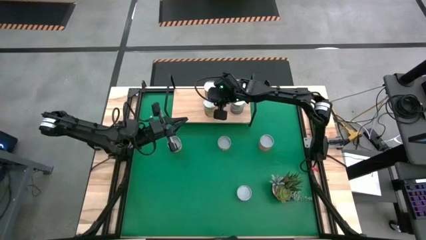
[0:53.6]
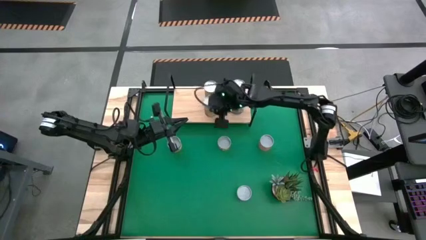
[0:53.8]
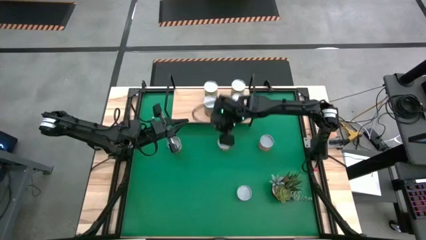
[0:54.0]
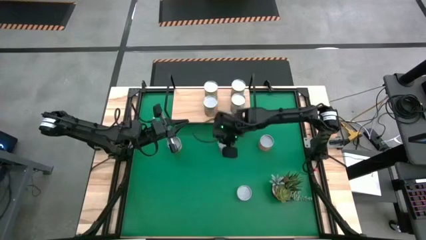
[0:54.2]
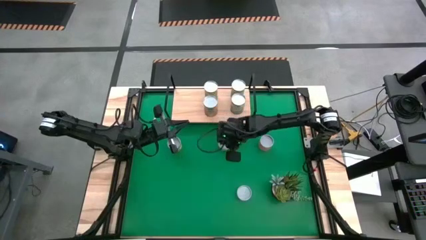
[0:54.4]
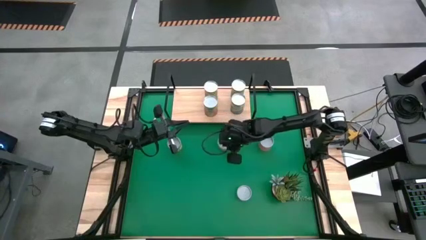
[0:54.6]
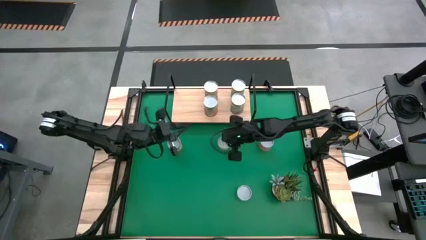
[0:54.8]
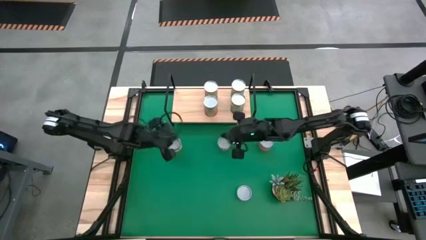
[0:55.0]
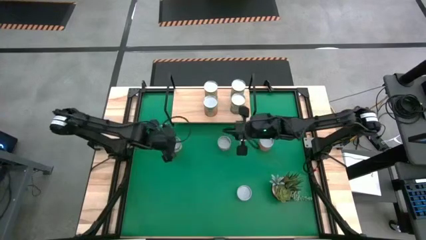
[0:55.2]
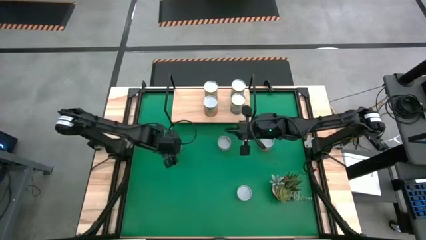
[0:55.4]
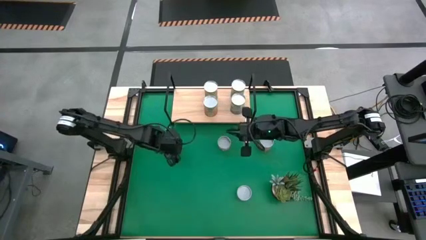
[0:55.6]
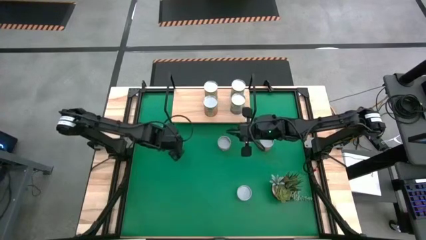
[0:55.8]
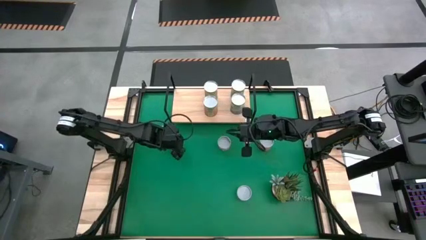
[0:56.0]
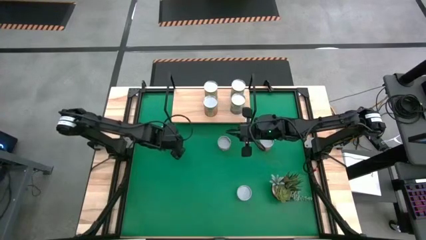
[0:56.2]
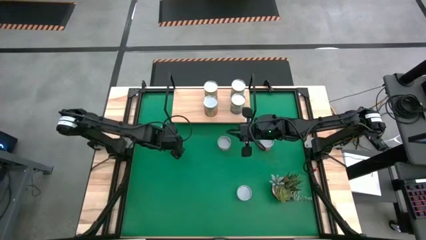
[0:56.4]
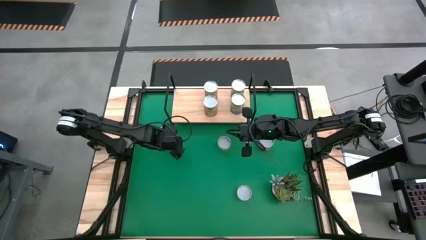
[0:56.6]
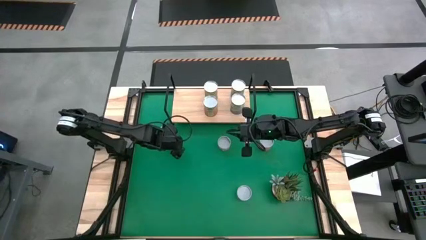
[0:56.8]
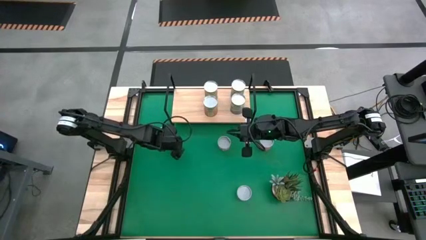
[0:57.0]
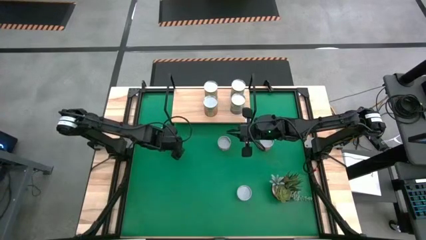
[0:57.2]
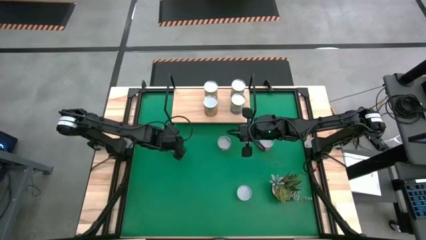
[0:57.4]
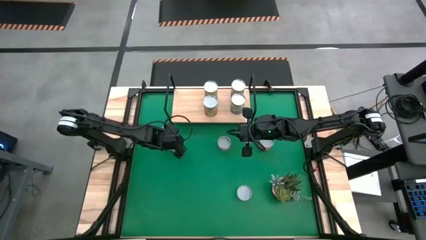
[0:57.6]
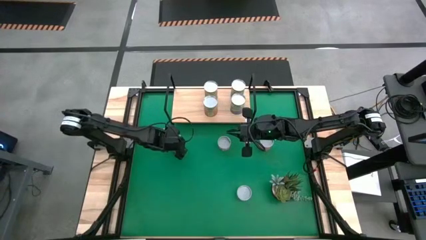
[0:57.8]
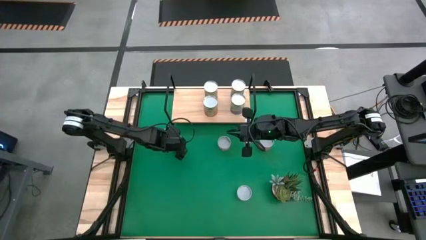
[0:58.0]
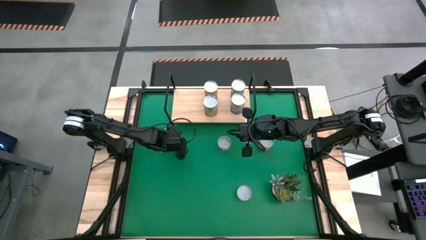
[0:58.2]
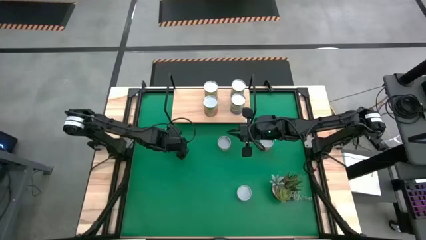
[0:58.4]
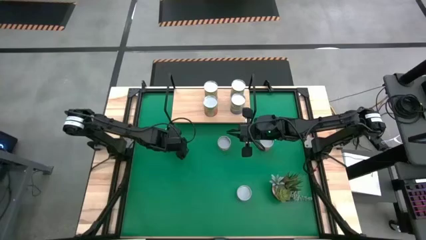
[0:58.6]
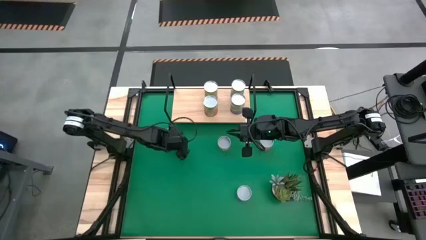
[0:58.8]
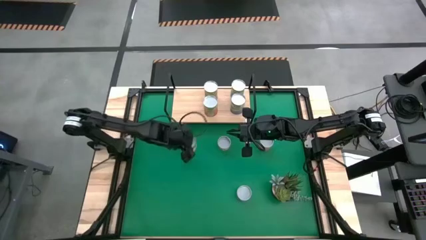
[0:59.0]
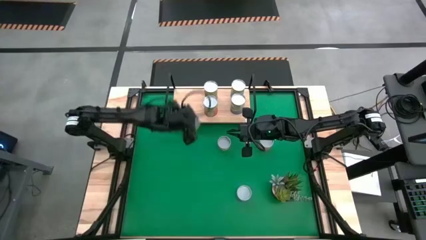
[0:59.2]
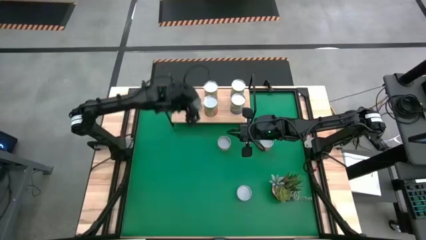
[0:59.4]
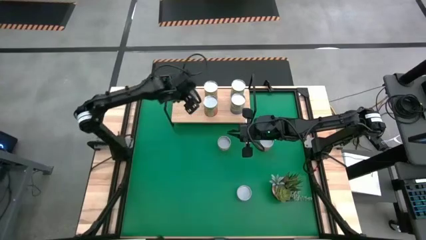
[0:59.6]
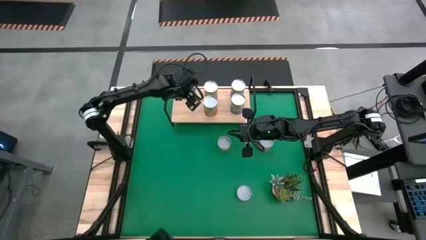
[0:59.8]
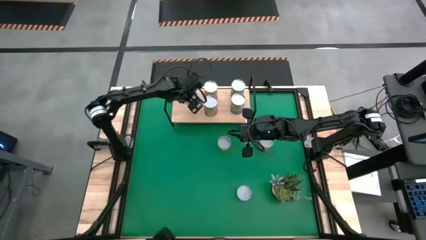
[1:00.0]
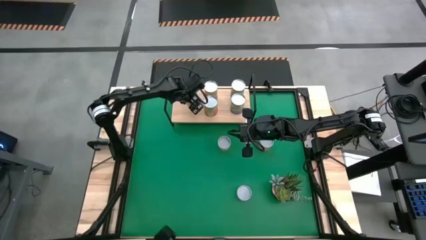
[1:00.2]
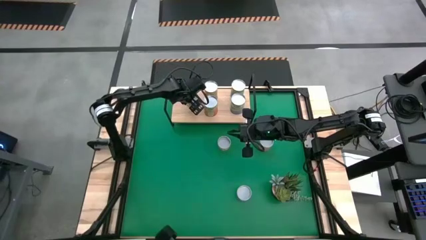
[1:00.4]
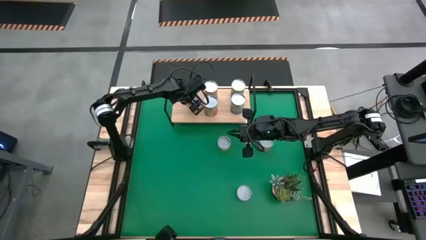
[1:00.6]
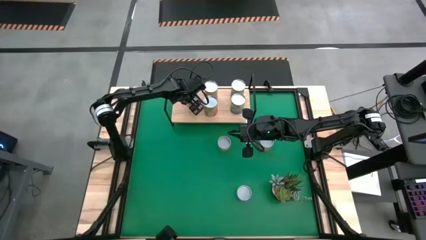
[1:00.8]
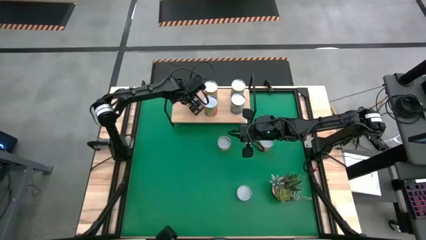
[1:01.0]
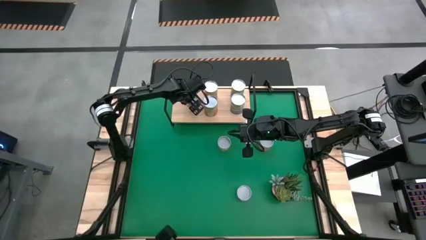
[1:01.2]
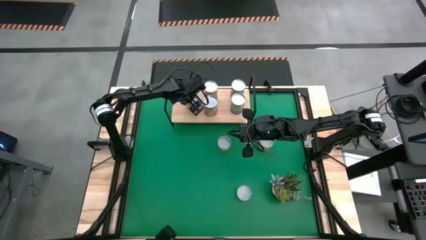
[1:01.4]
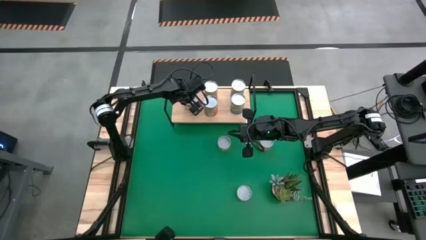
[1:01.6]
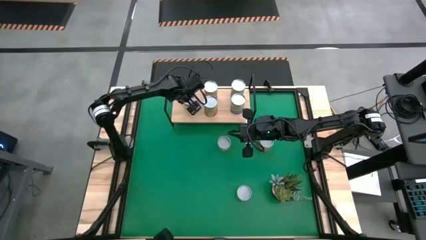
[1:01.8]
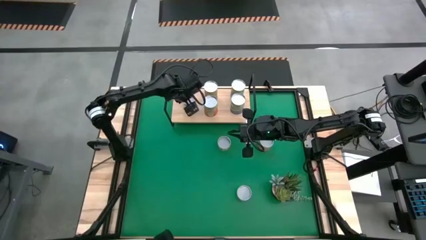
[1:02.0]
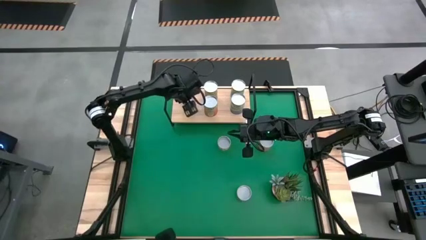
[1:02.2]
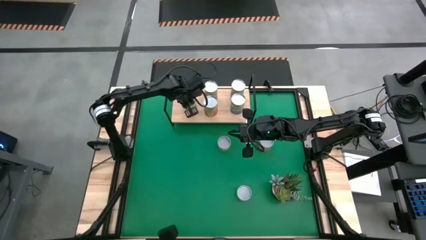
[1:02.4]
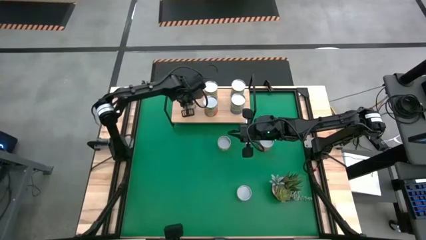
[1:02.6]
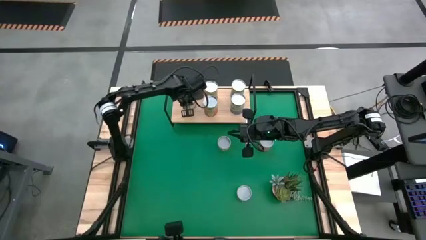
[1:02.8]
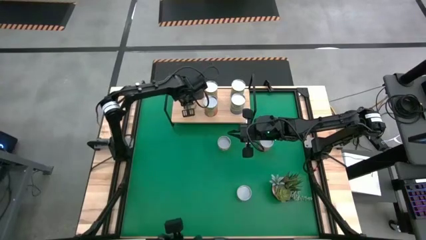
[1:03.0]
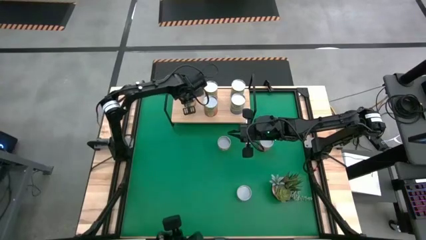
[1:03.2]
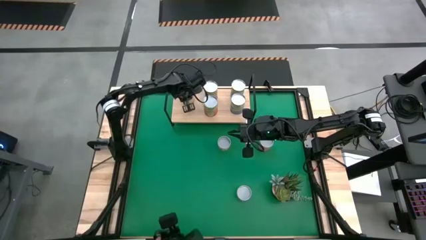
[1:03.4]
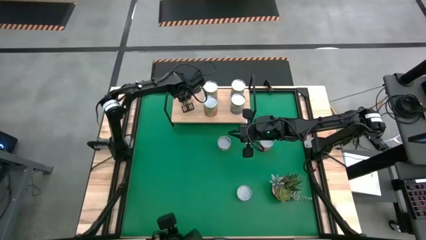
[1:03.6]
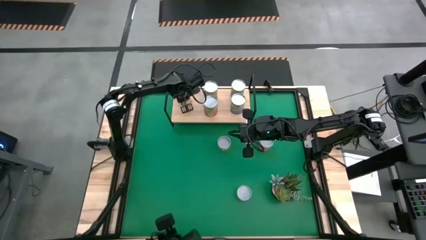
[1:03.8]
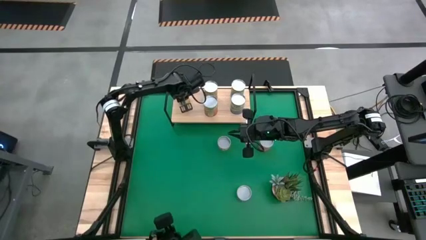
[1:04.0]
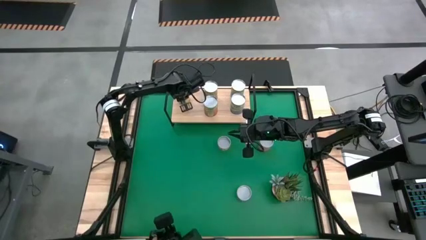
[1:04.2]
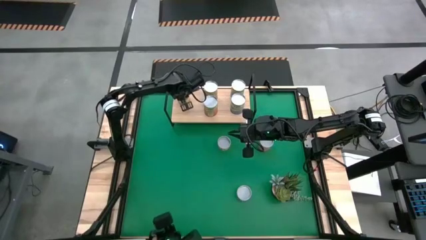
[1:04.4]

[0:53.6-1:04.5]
Task: Pick and place cans onto a shelf
Put the canned peaches on the shelf
